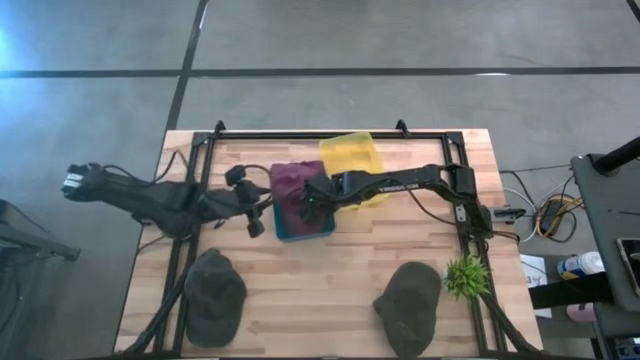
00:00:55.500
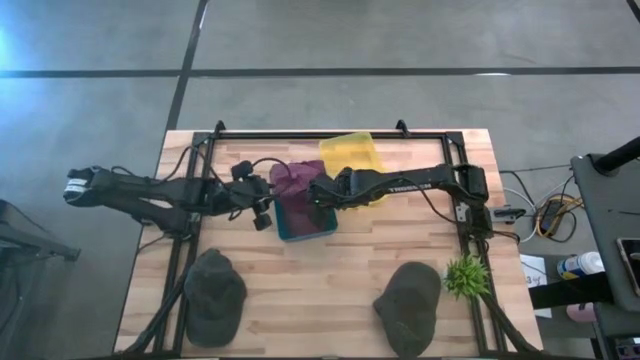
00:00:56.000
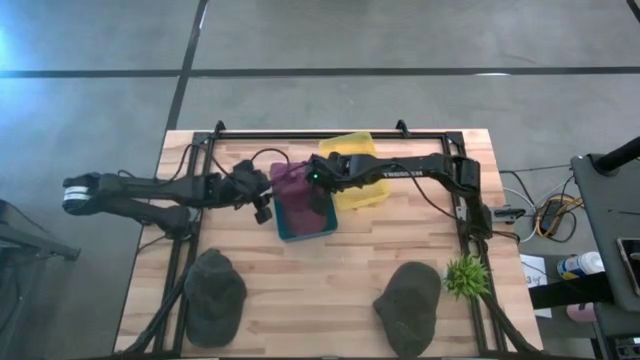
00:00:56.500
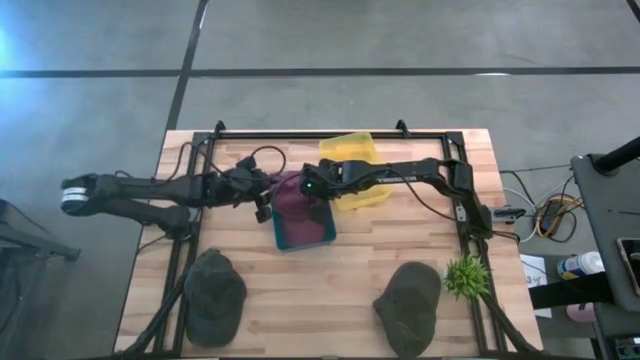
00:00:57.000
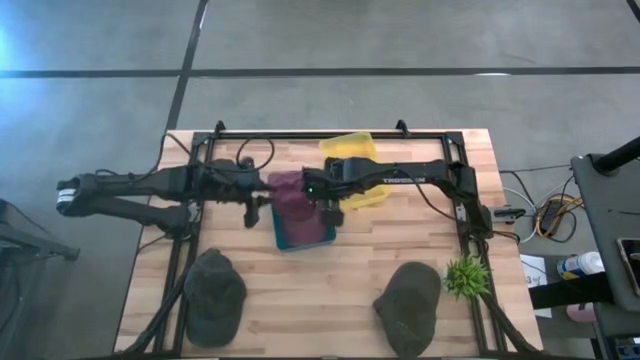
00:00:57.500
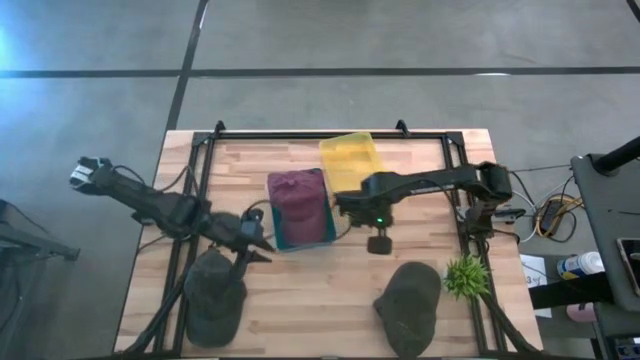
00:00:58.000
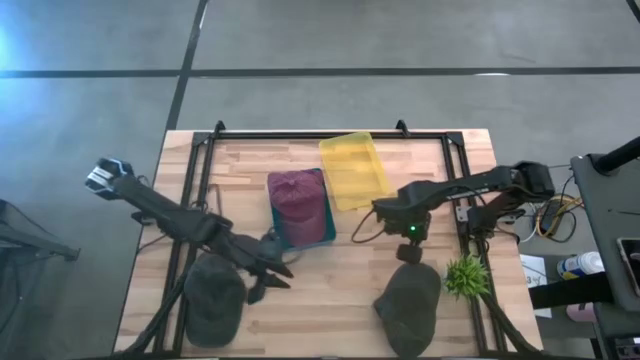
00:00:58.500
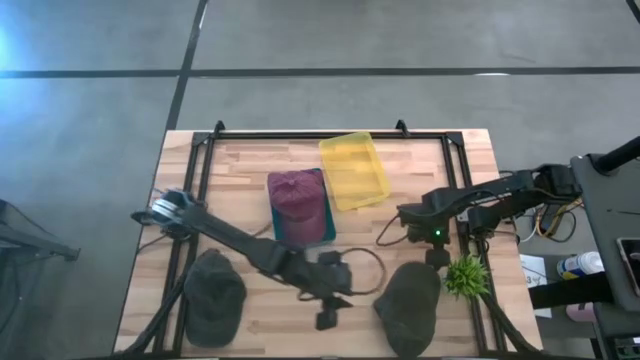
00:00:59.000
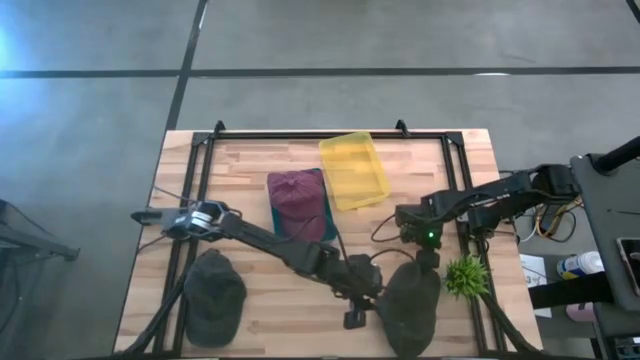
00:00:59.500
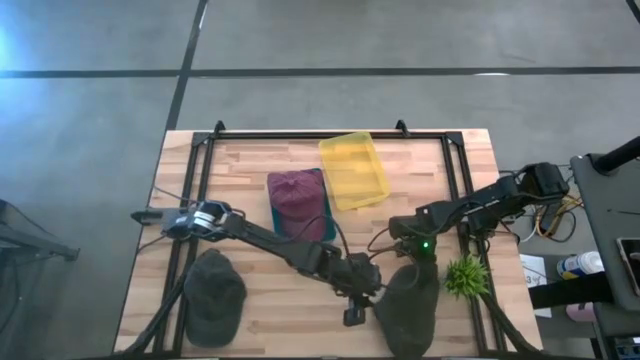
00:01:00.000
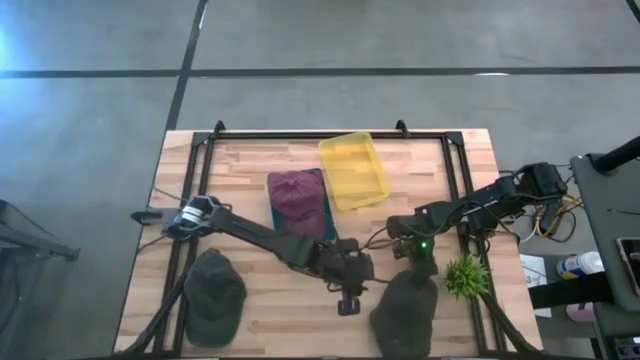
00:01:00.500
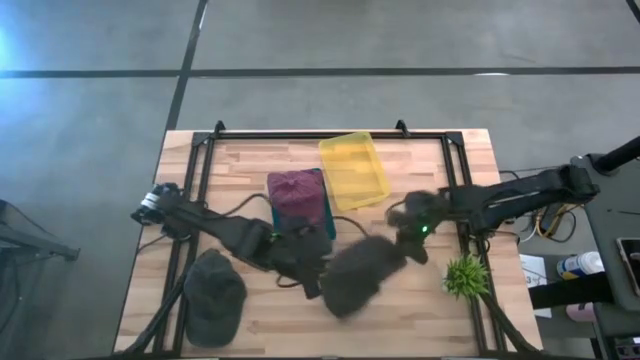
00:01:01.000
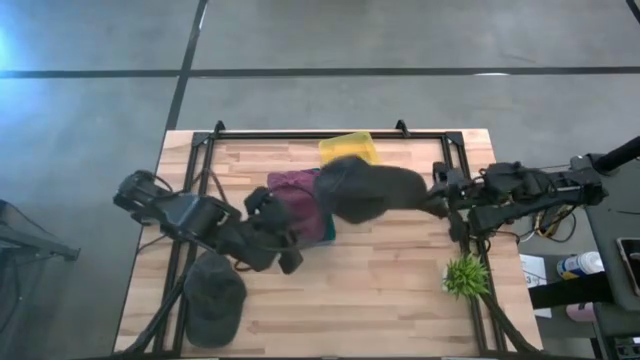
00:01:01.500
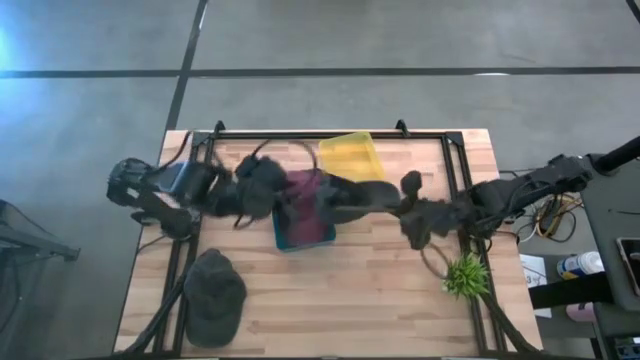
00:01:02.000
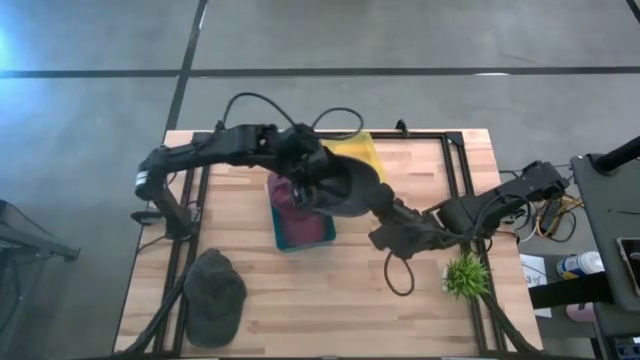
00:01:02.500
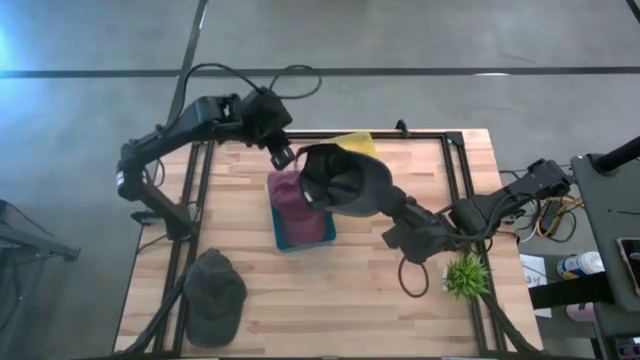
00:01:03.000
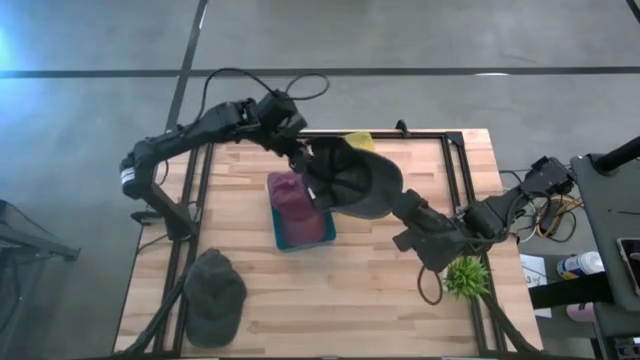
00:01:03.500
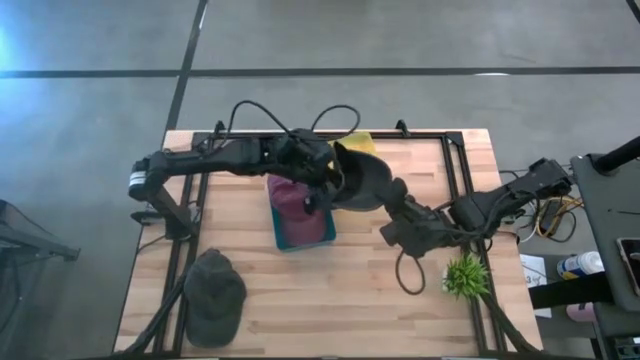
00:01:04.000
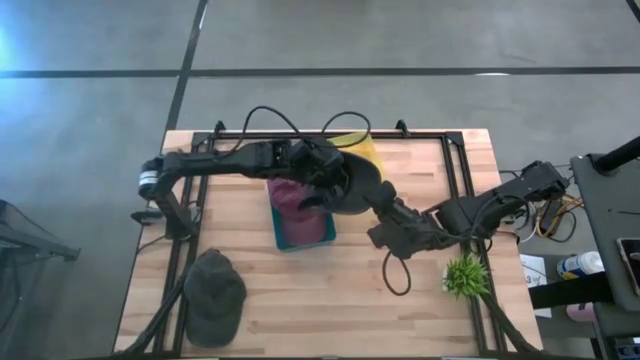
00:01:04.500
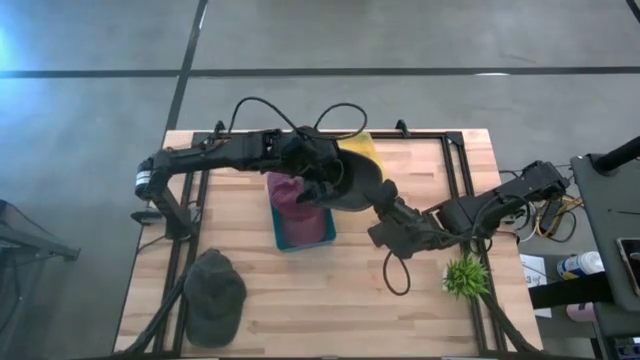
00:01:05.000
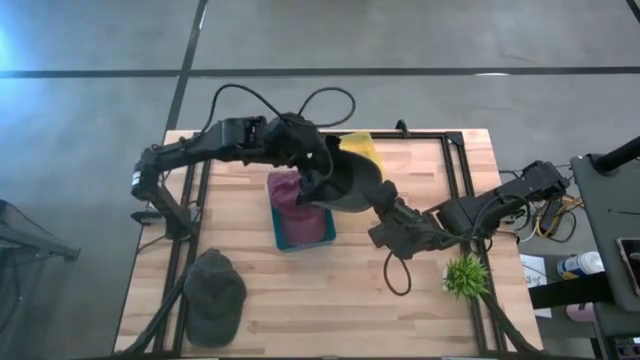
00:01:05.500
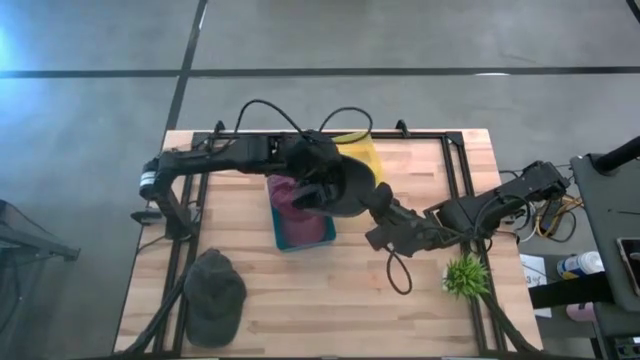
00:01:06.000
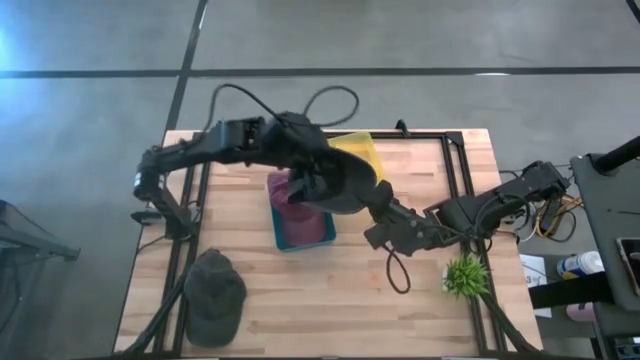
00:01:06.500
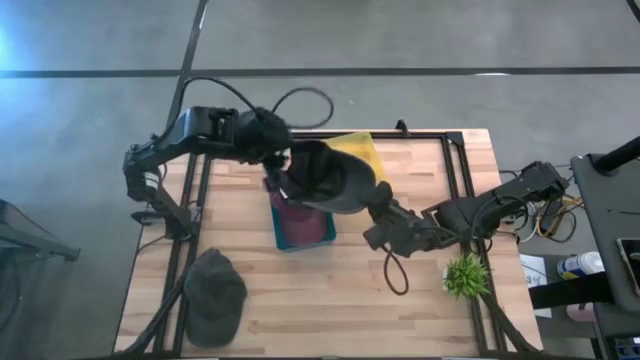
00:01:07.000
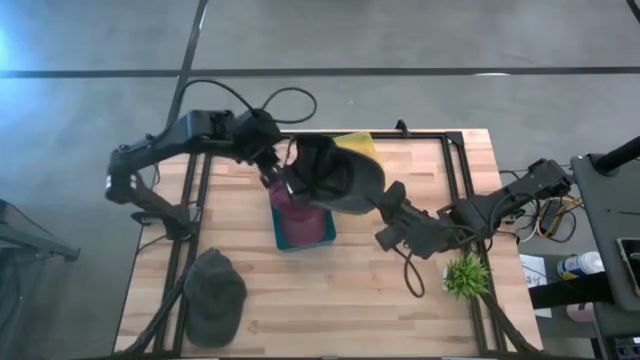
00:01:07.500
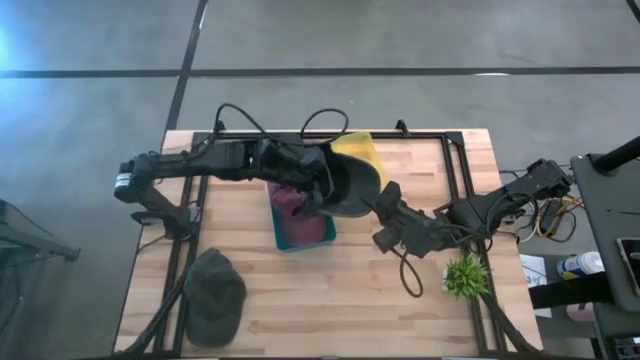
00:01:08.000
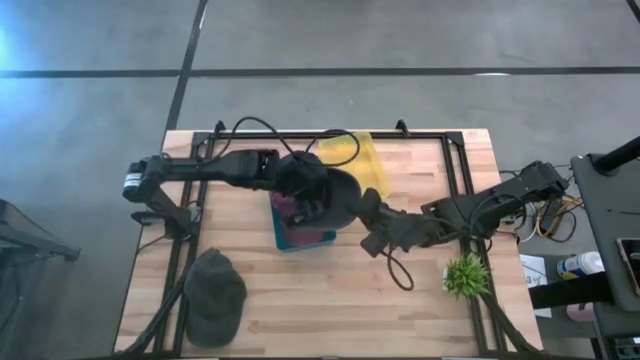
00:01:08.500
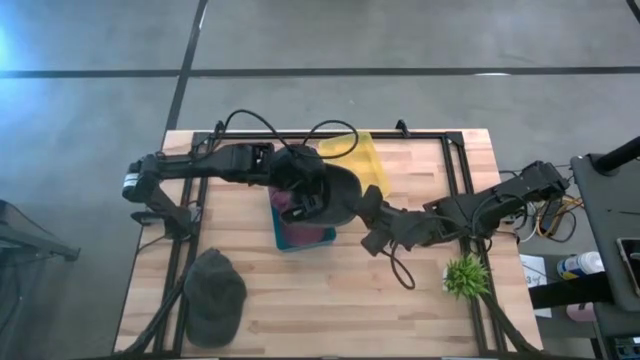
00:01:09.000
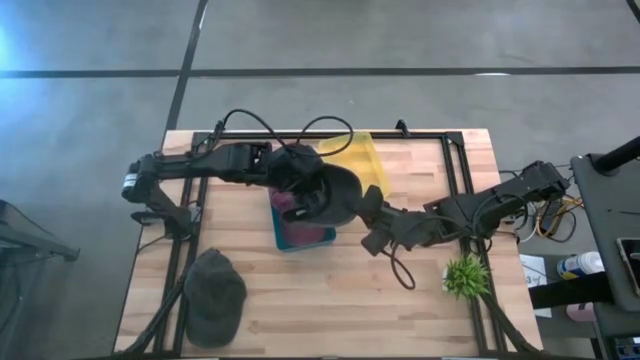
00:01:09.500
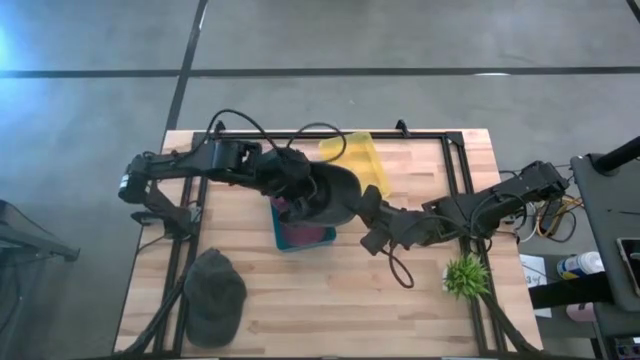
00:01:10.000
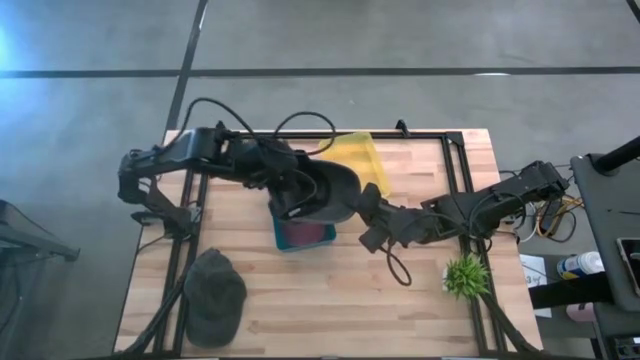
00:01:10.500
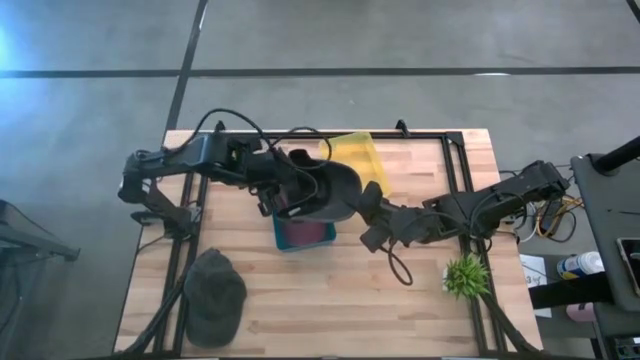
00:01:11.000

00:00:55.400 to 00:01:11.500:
Task: Pick & Place hat
Put the right black cap into the yellow bin

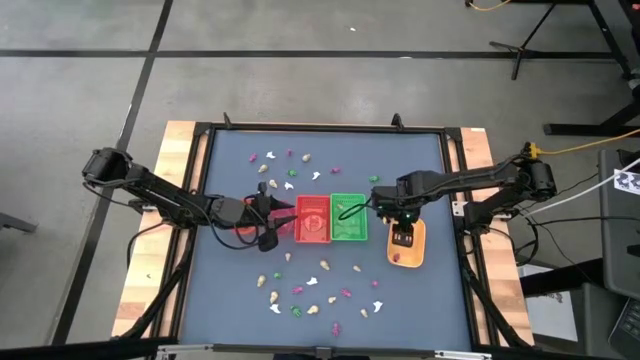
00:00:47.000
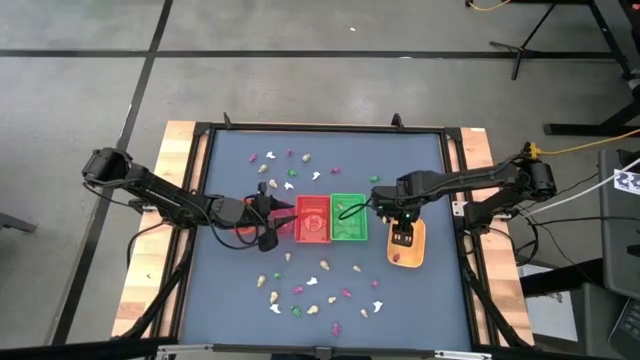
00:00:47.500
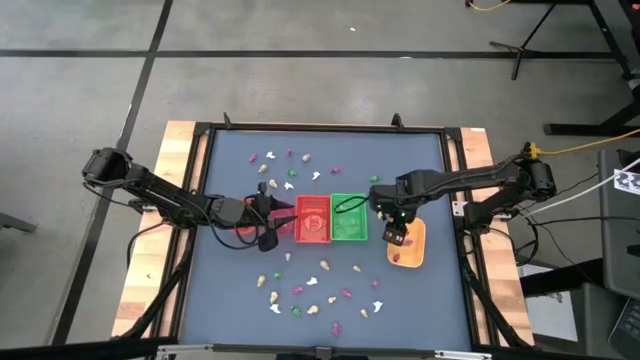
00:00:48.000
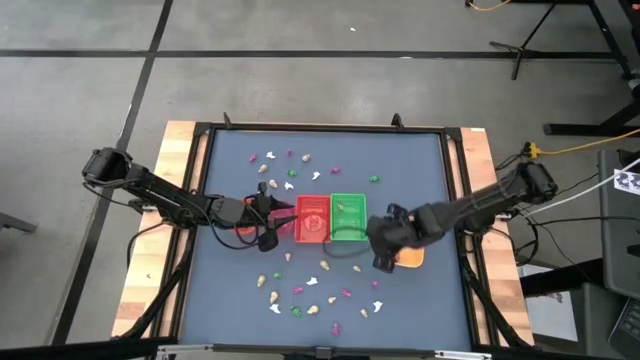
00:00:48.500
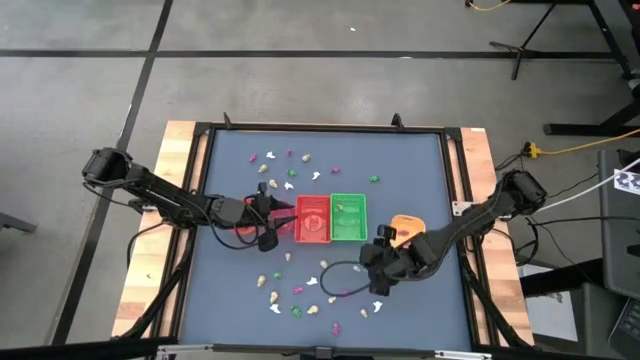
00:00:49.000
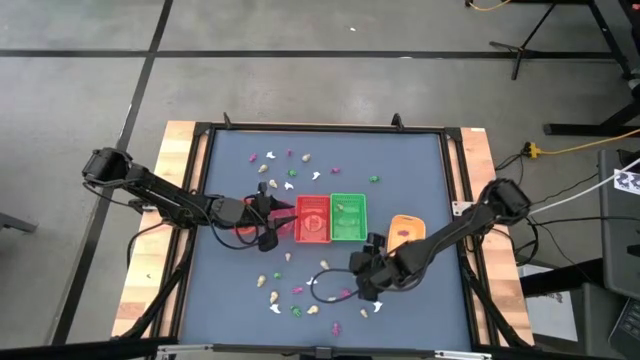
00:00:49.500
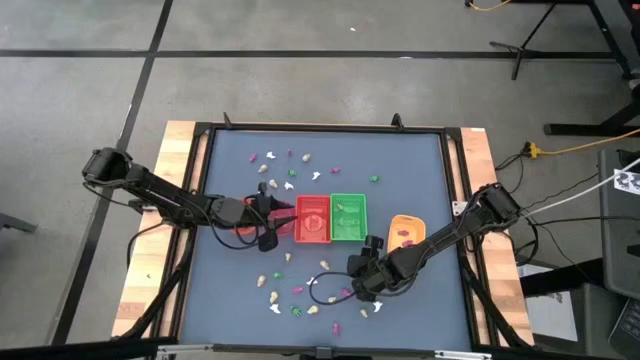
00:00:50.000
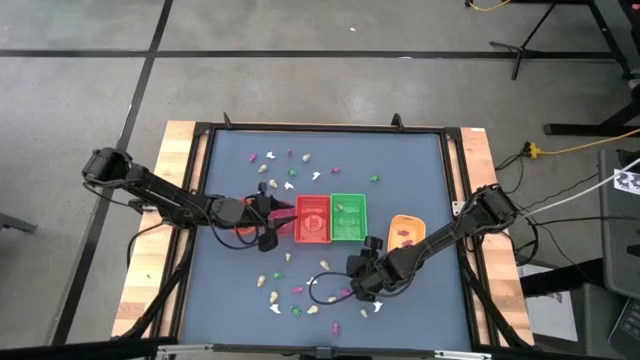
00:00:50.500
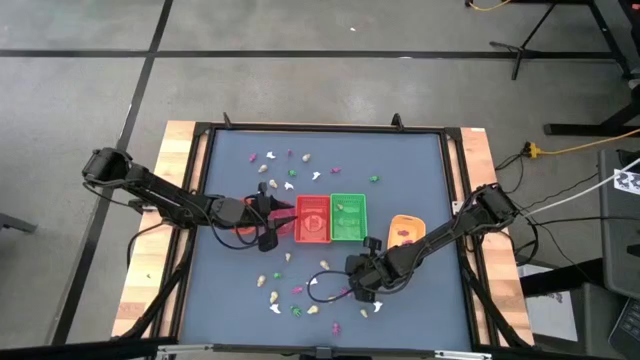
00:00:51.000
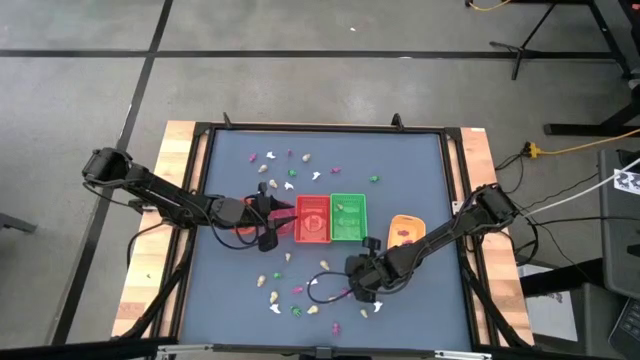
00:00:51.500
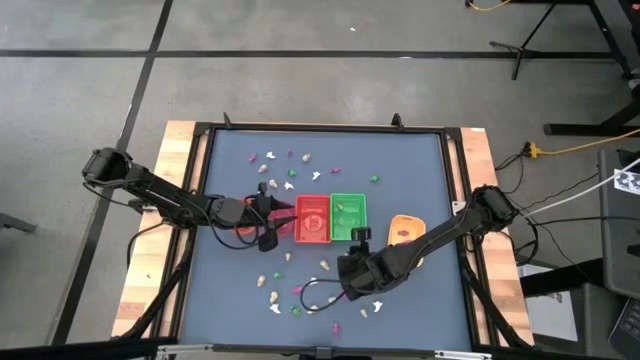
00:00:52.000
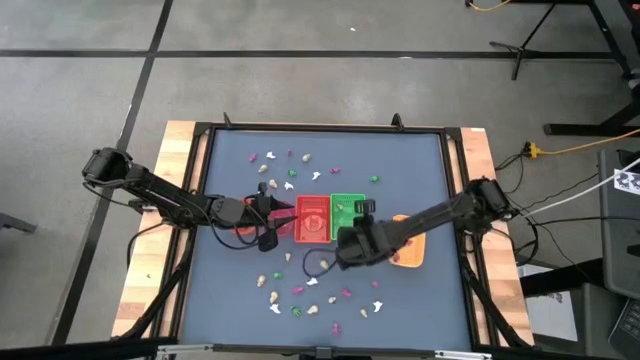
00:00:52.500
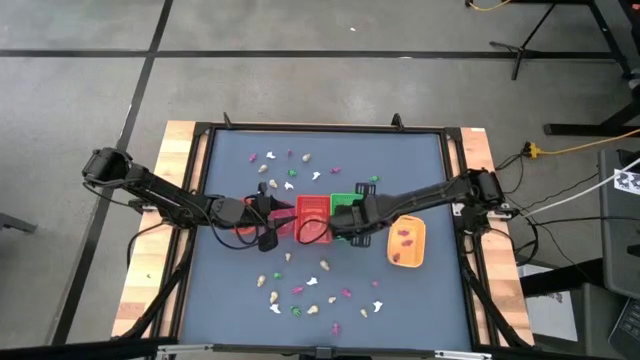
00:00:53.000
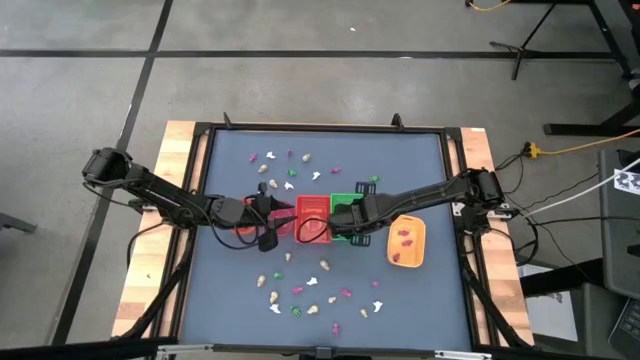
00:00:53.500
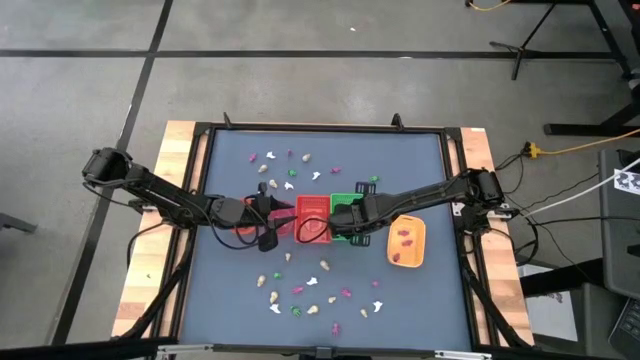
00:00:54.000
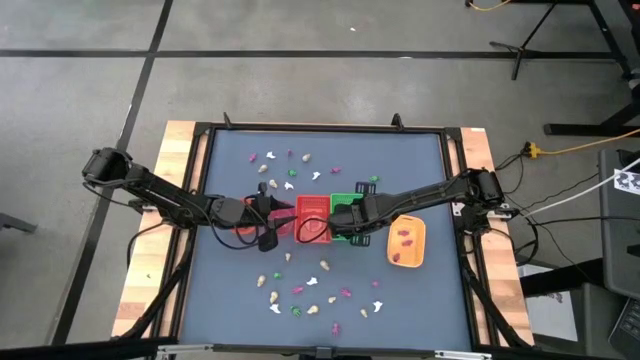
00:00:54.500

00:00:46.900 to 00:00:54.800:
Task: Sort Halloween decoration
Put the yellow skull toy into the green bin
